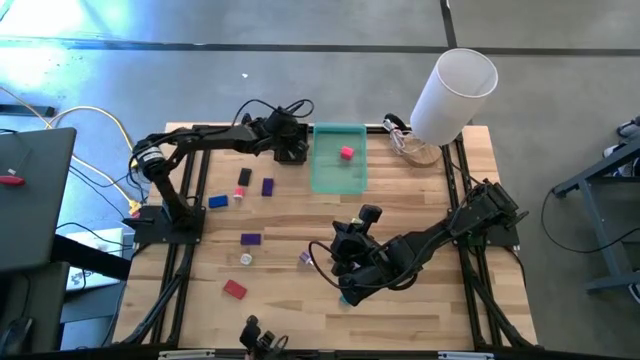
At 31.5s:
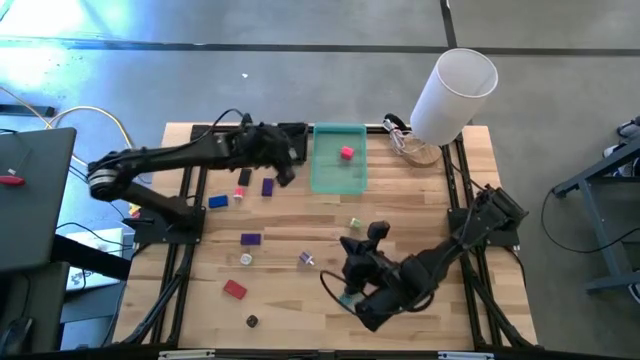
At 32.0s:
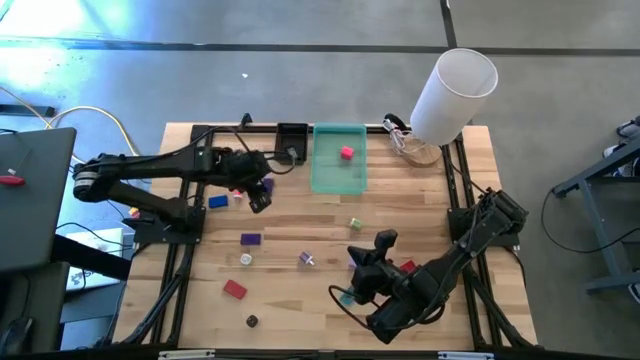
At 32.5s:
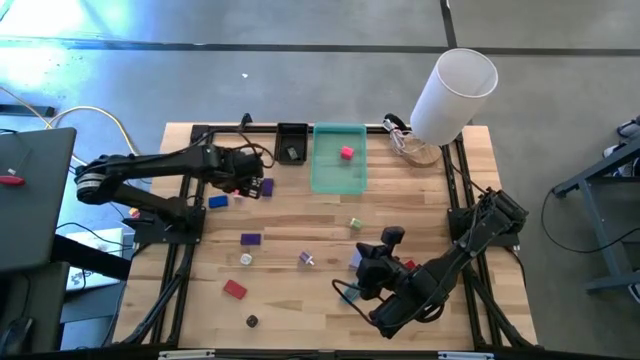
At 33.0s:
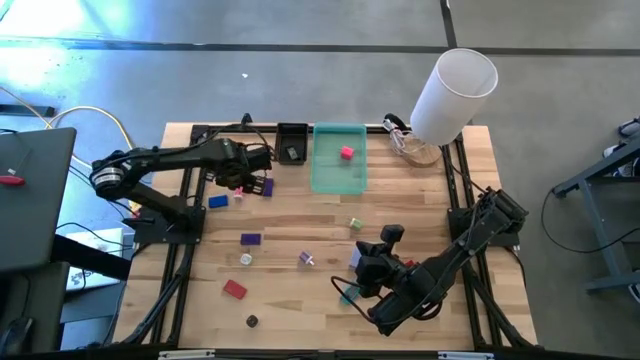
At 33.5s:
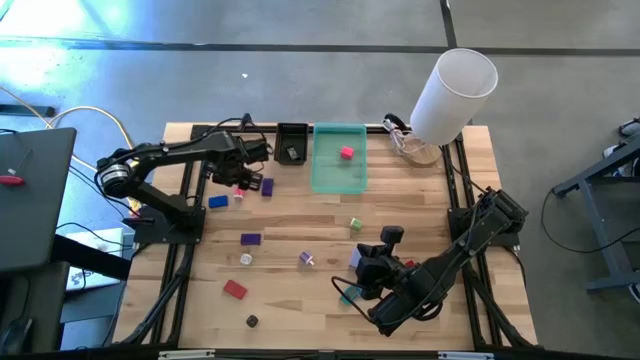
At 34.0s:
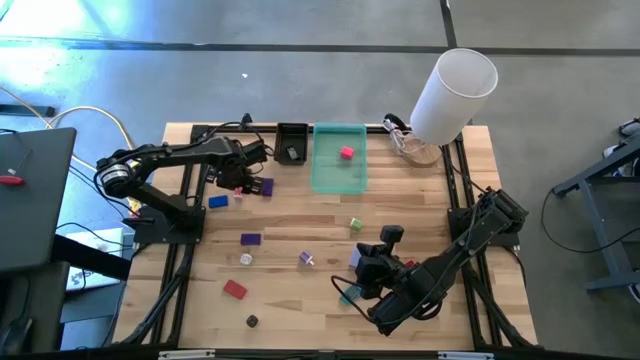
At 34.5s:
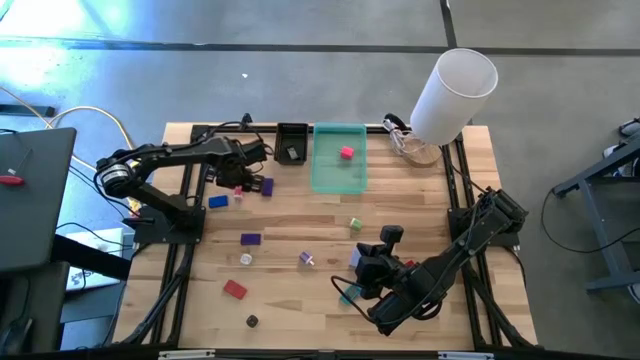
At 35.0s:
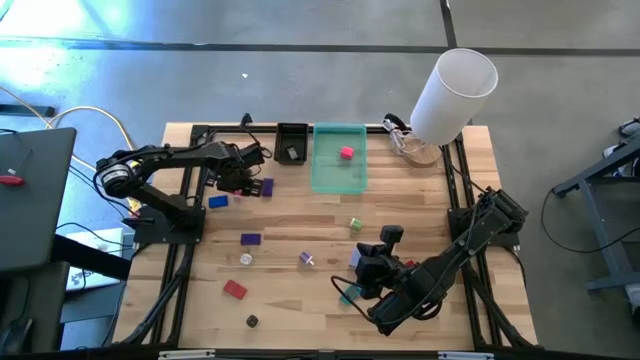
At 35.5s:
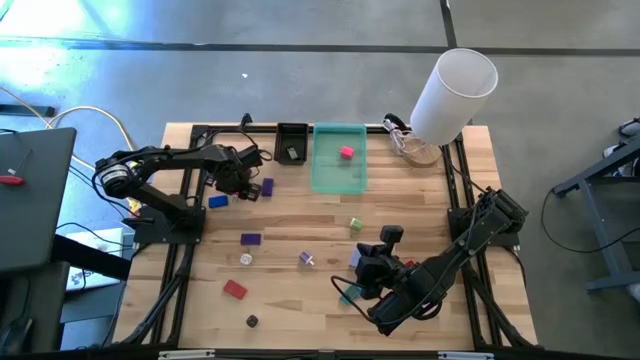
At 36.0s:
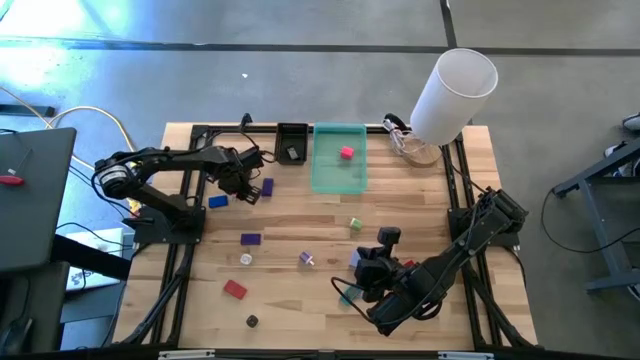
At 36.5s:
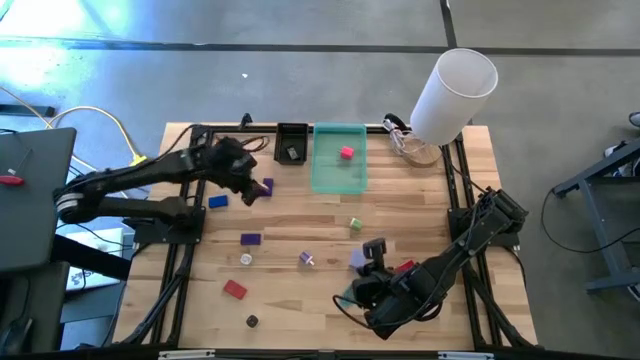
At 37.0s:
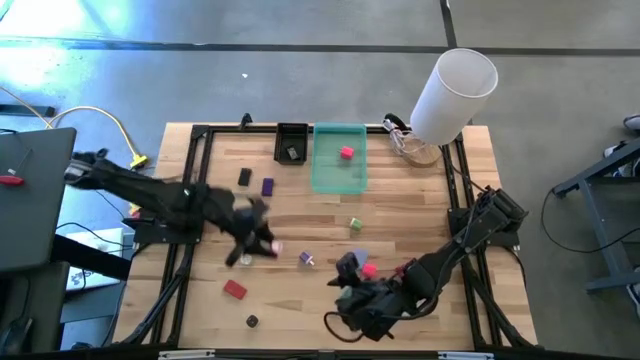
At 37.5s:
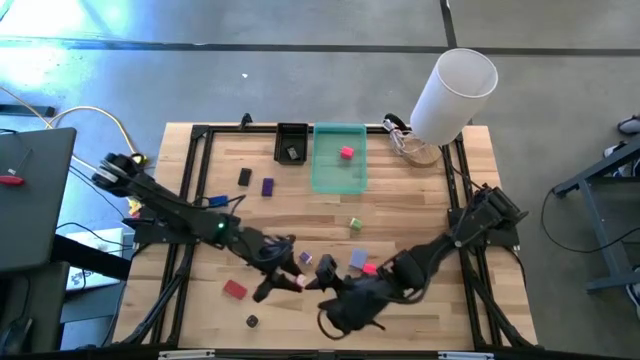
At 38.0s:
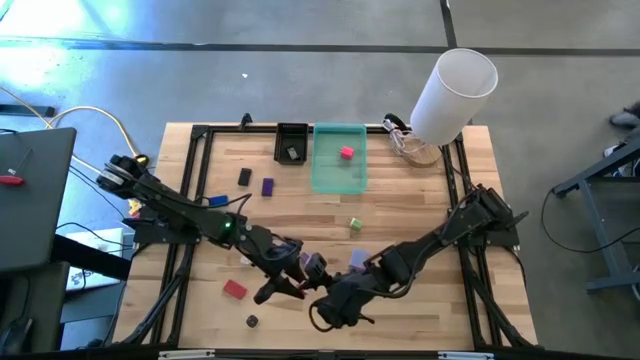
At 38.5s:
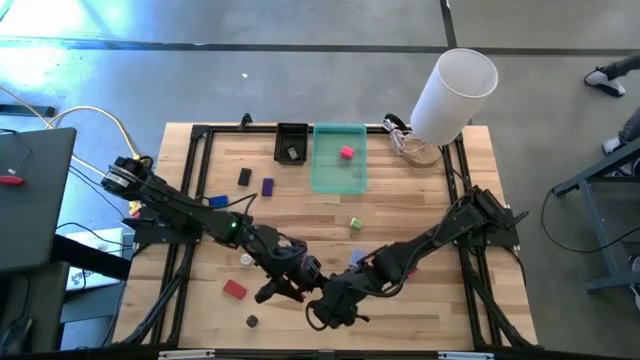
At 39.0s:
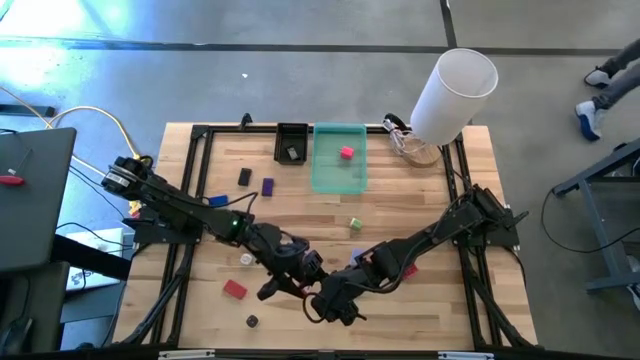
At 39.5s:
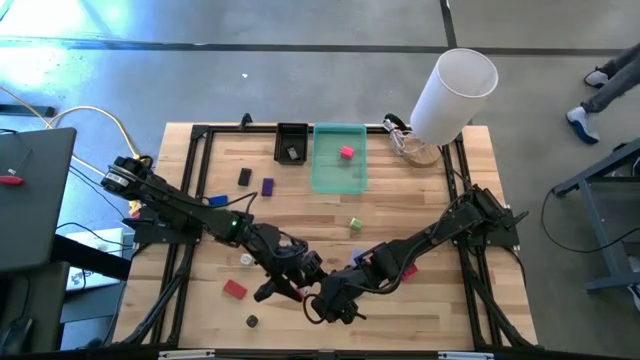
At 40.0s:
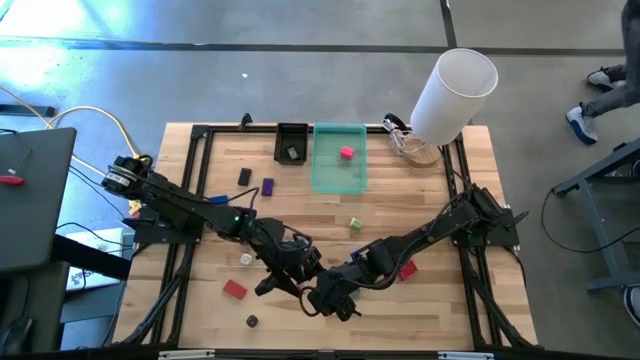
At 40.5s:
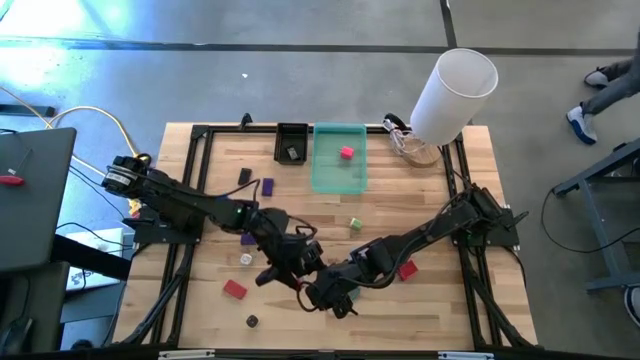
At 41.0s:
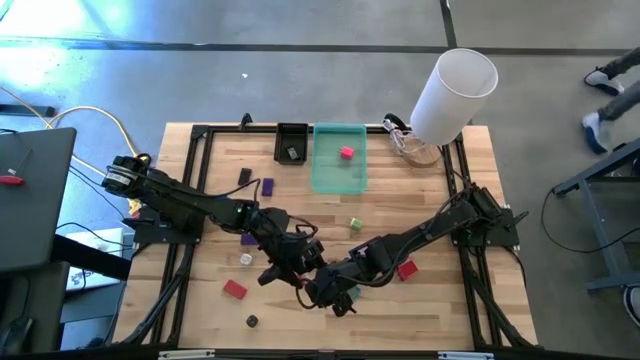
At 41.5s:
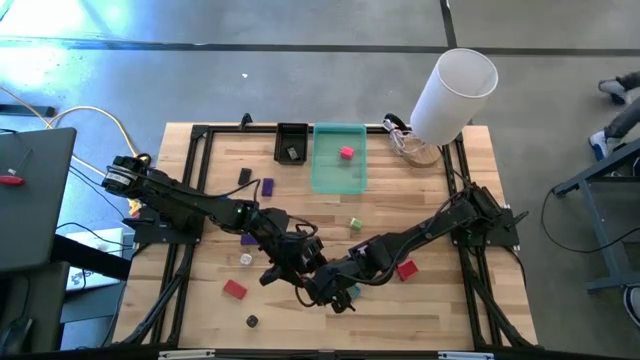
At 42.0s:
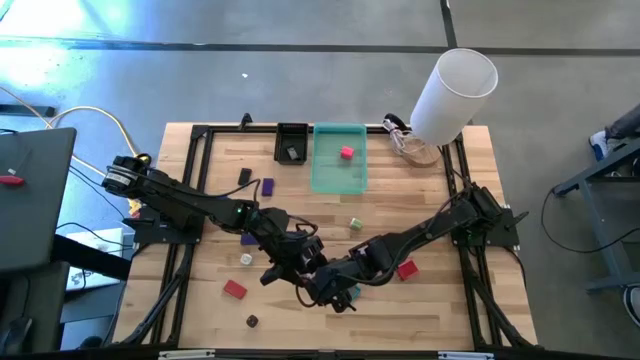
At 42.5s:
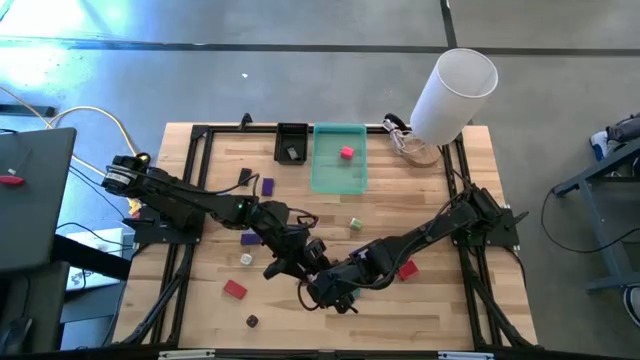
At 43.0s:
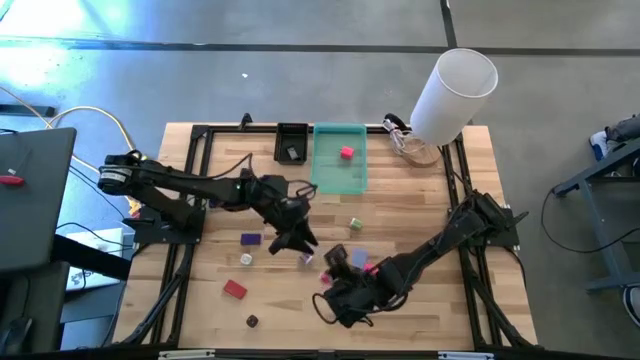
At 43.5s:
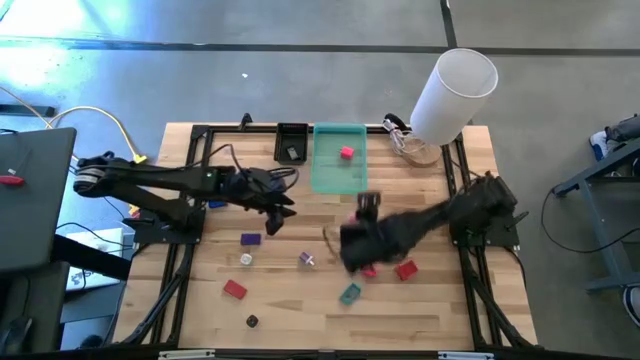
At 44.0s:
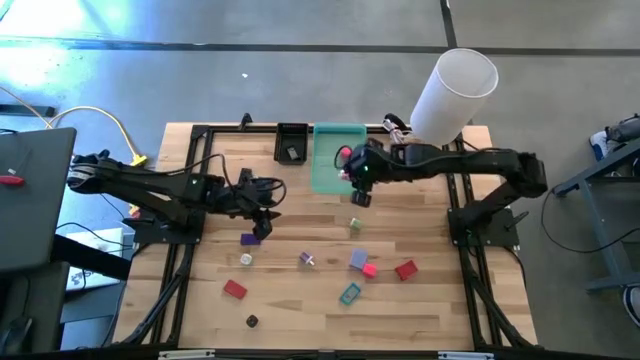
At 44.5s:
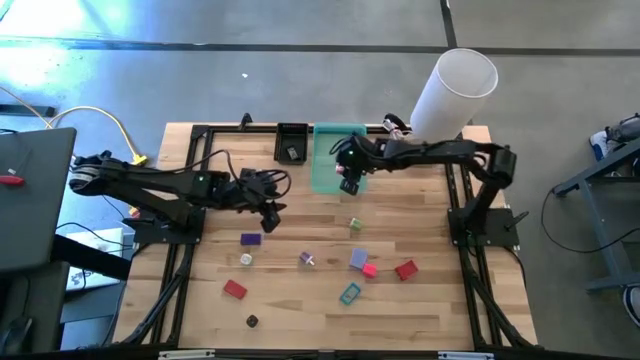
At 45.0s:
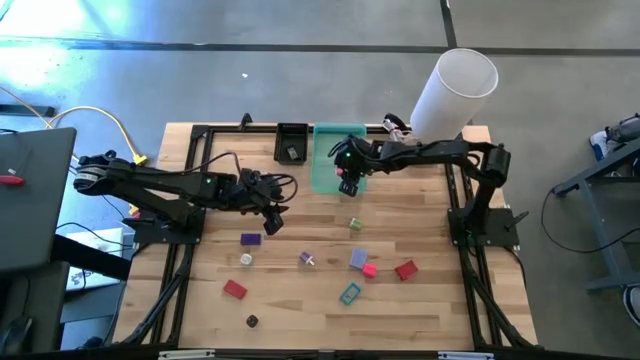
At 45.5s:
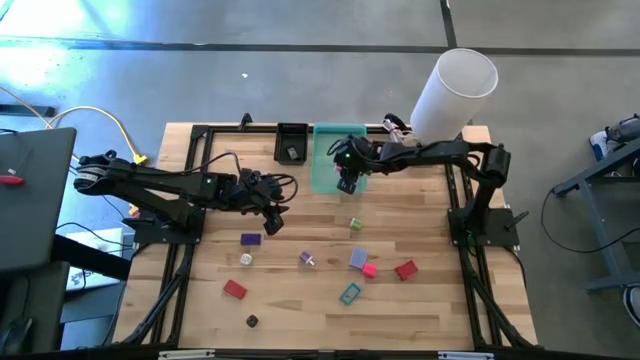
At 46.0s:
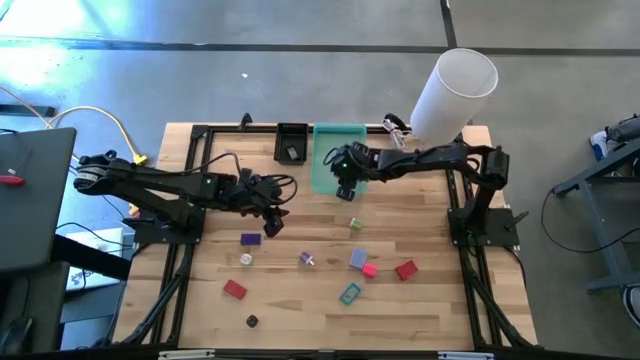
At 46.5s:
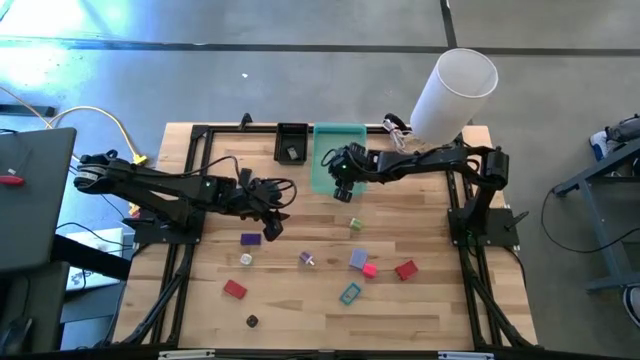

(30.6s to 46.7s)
Task: Pick & Place Office items
Put the pink white charger adapter into the green bin

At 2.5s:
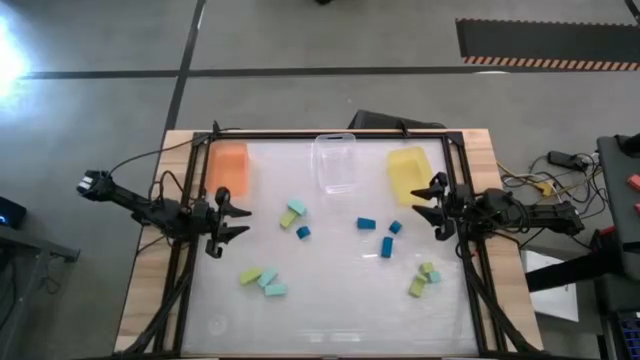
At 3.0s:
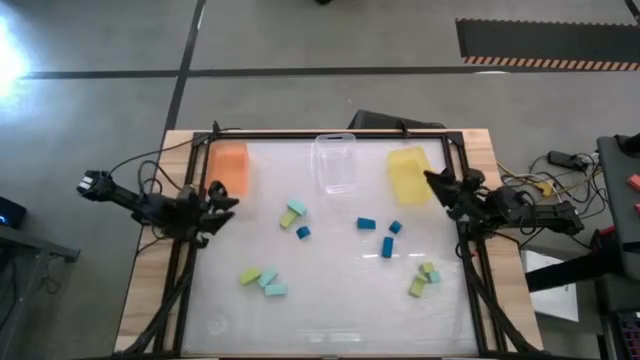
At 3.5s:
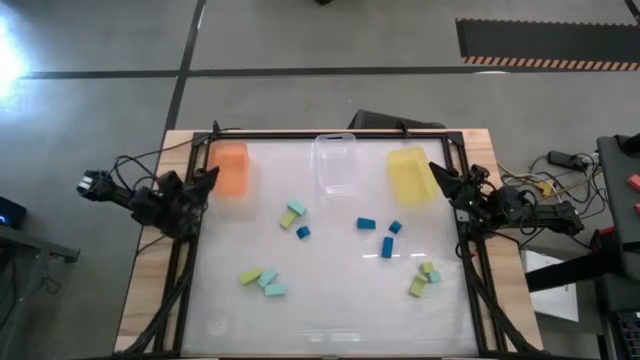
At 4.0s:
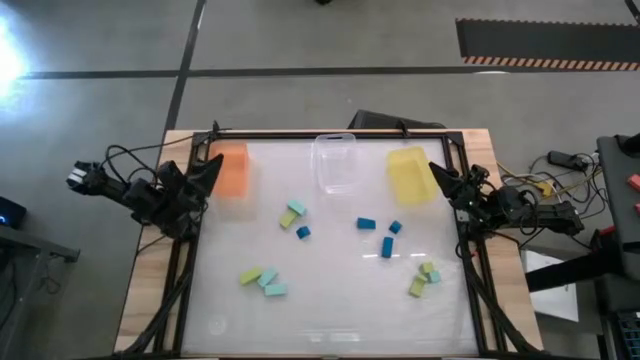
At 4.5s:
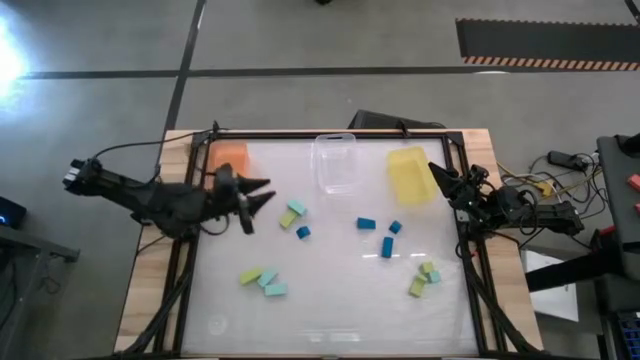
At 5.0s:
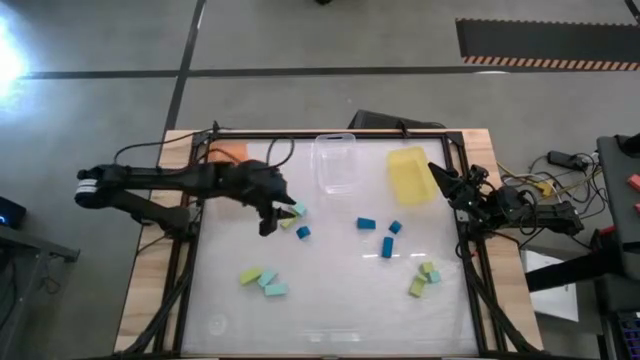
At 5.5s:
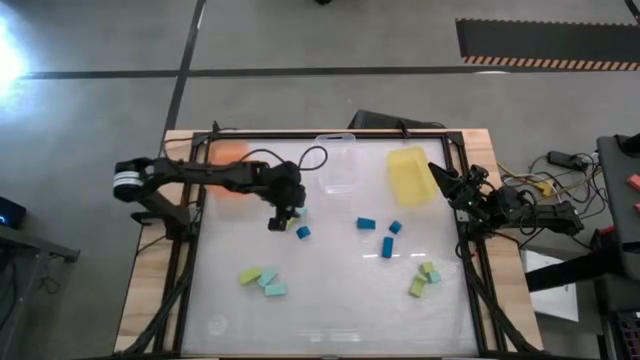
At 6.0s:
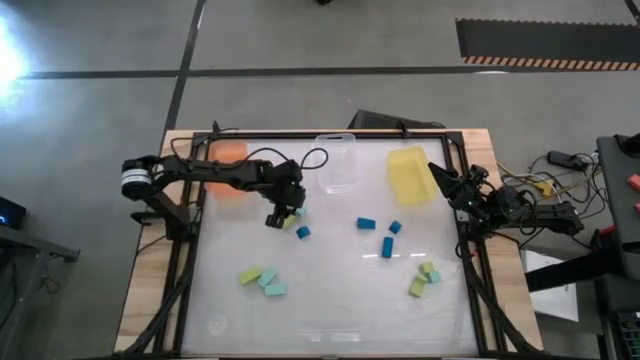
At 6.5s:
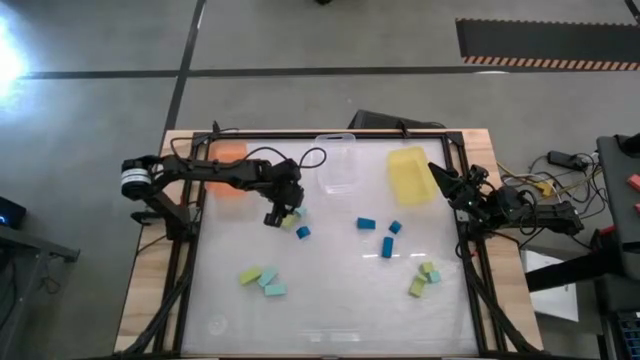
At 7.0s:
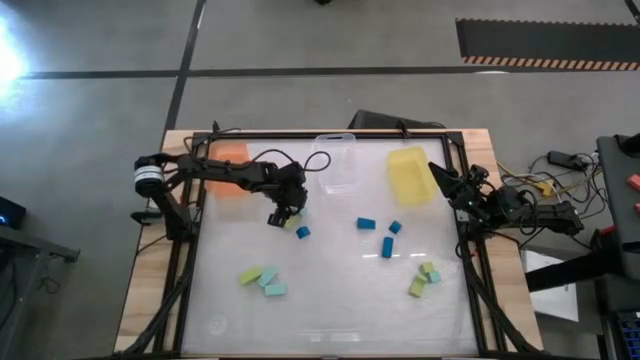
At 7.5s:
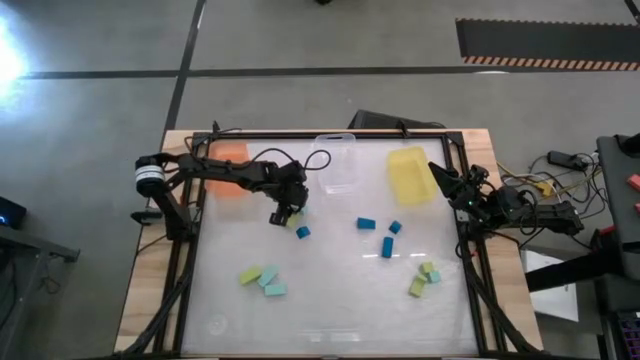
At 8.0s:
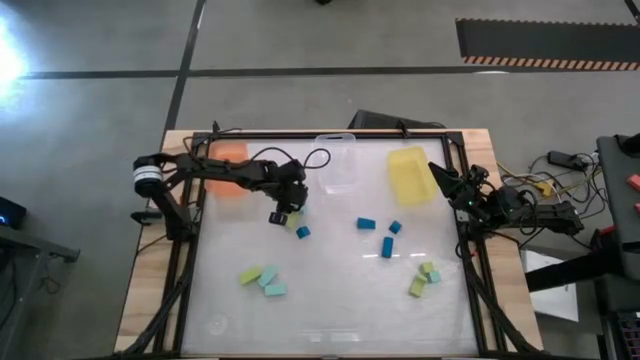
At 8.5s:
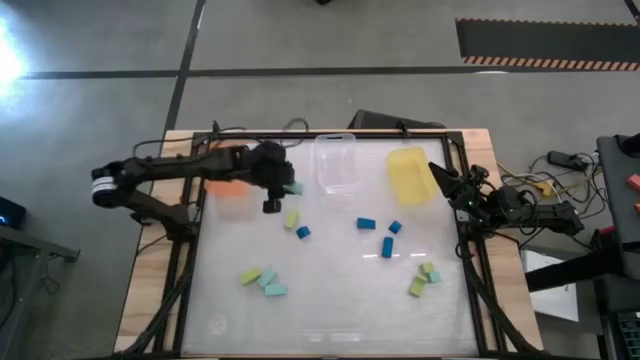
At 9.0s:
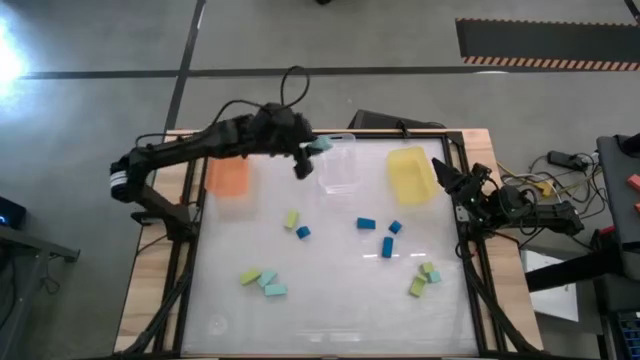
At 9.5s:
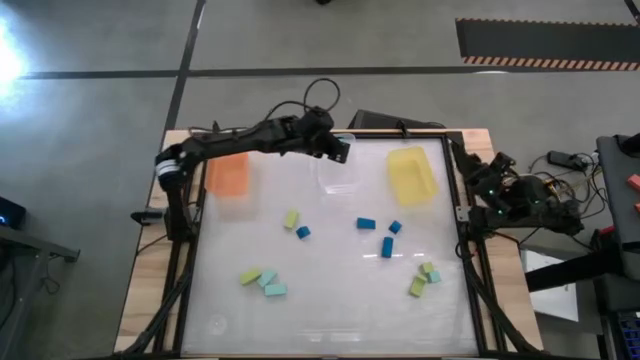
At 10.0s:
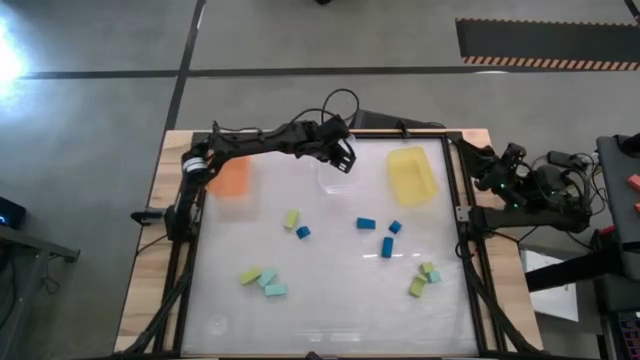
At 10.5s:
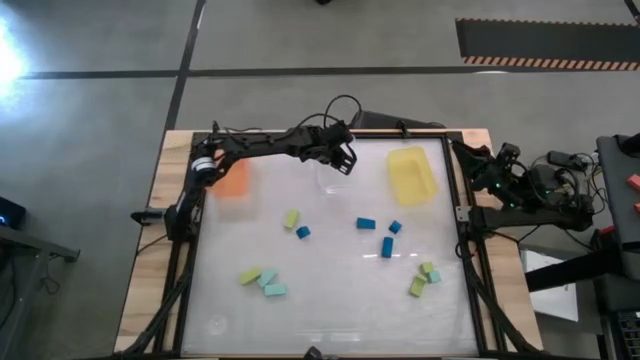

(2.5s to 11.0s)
Task: Sort & place blocks by color
Put the light blue block into the transparent bin
